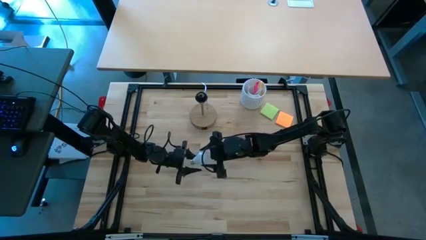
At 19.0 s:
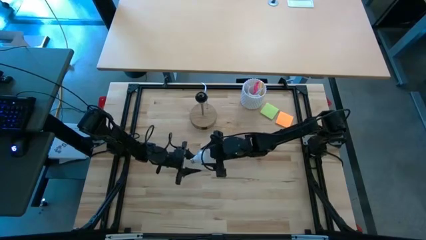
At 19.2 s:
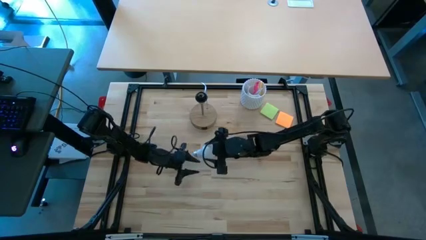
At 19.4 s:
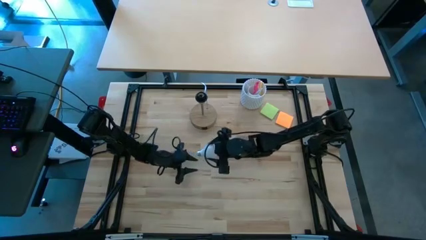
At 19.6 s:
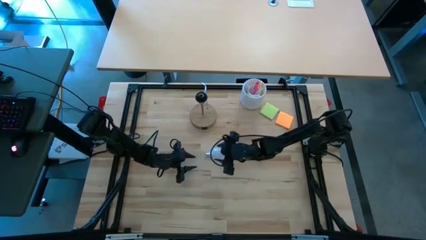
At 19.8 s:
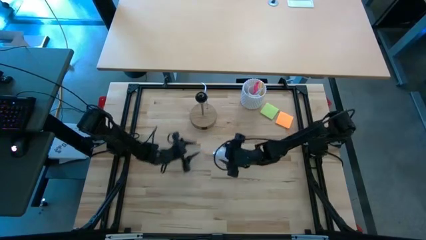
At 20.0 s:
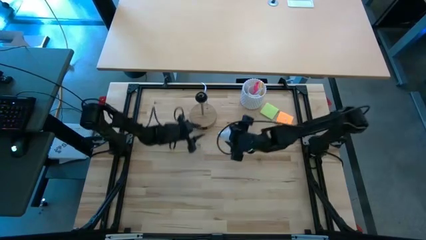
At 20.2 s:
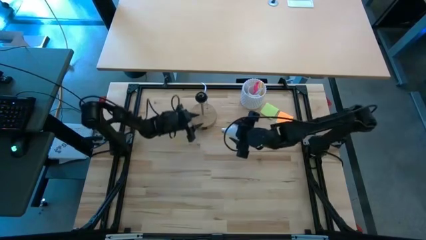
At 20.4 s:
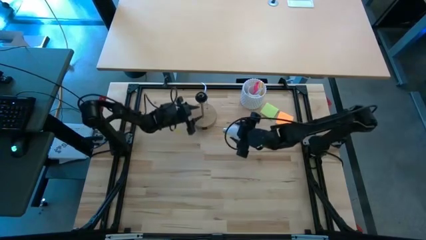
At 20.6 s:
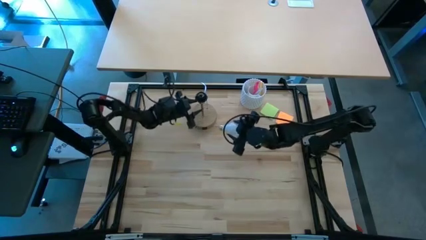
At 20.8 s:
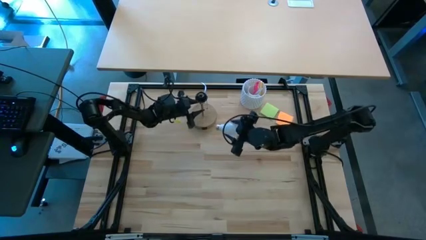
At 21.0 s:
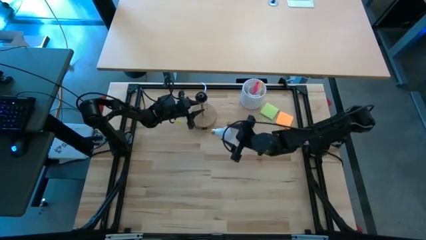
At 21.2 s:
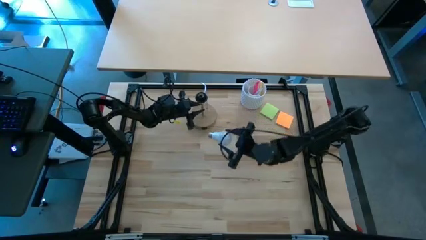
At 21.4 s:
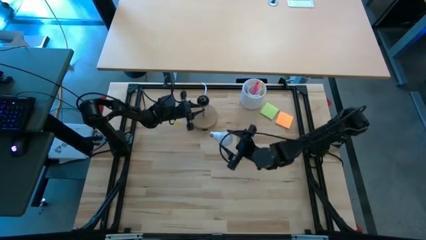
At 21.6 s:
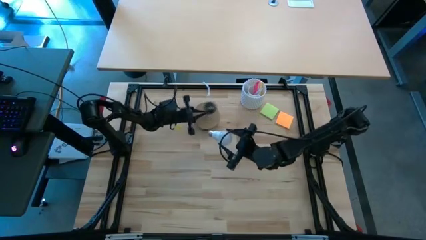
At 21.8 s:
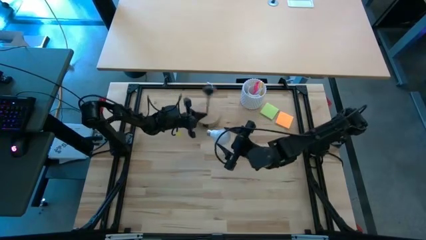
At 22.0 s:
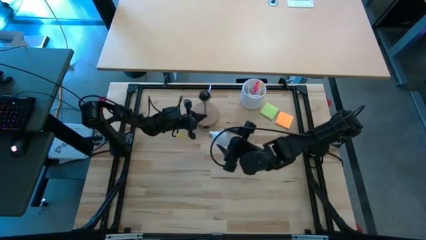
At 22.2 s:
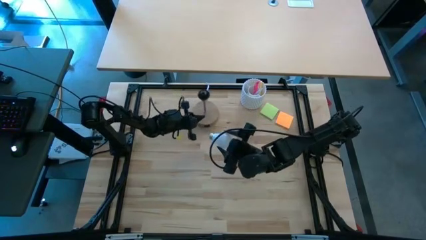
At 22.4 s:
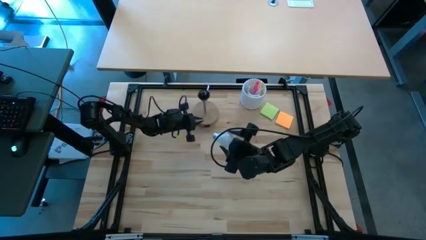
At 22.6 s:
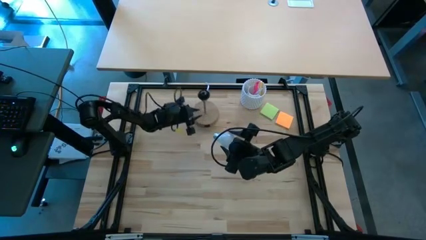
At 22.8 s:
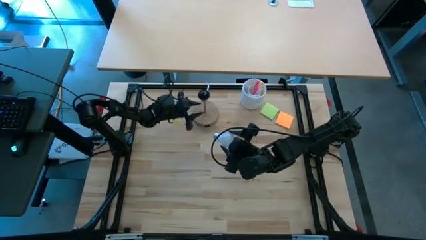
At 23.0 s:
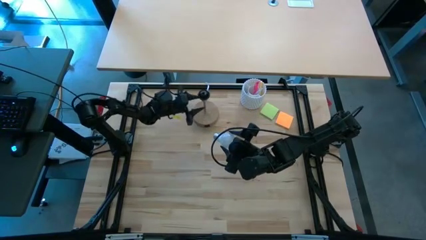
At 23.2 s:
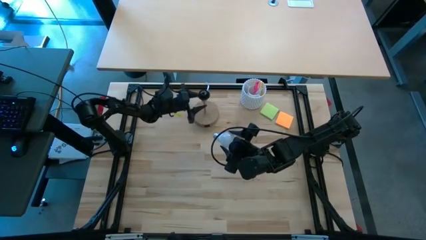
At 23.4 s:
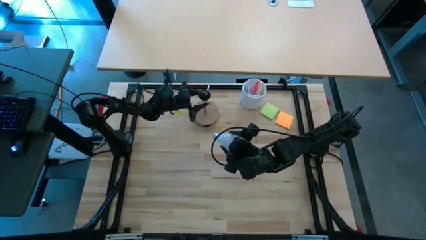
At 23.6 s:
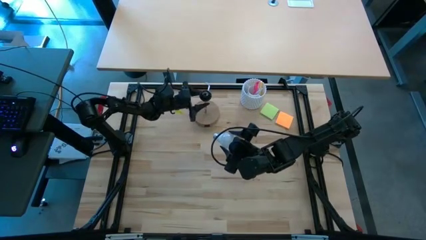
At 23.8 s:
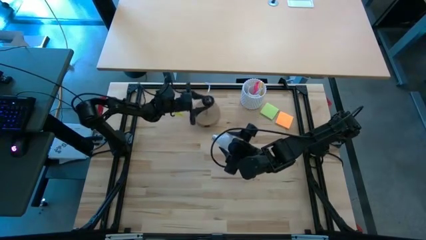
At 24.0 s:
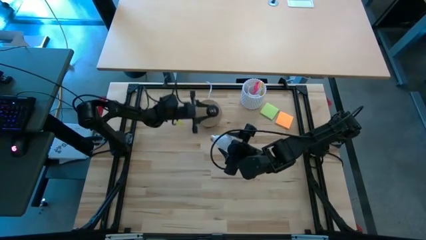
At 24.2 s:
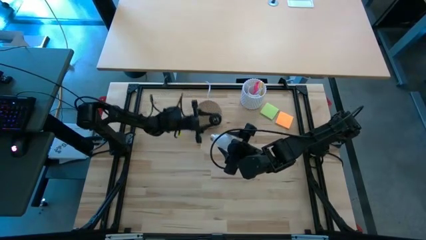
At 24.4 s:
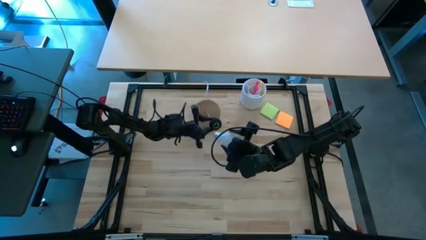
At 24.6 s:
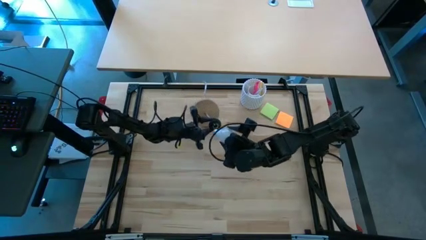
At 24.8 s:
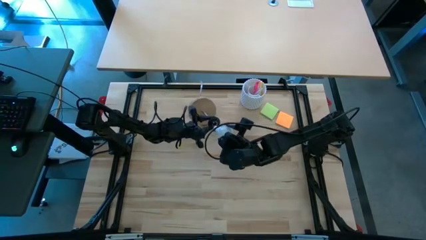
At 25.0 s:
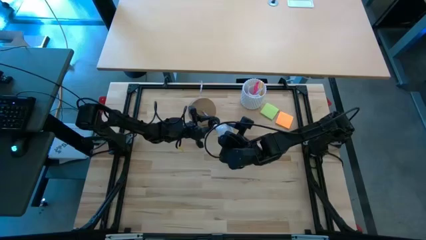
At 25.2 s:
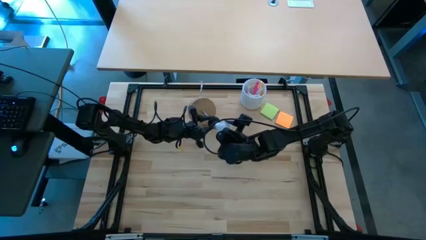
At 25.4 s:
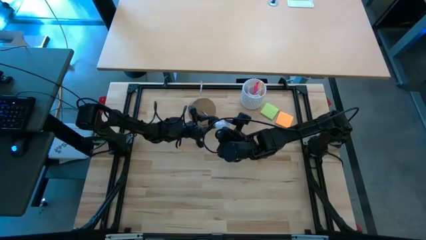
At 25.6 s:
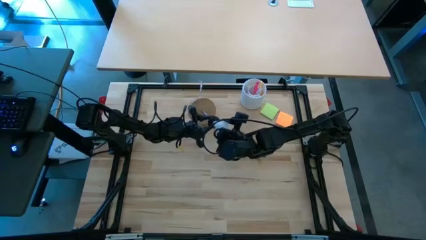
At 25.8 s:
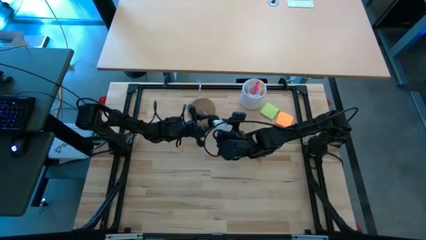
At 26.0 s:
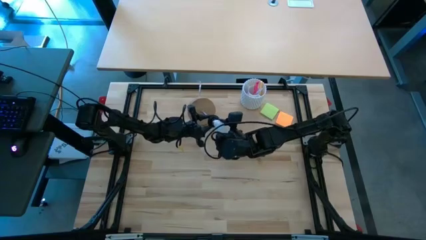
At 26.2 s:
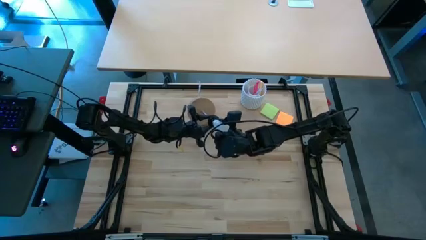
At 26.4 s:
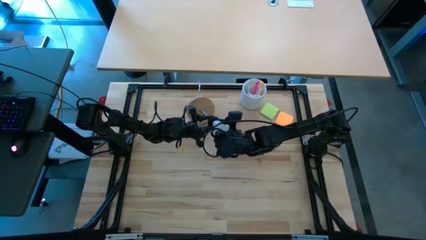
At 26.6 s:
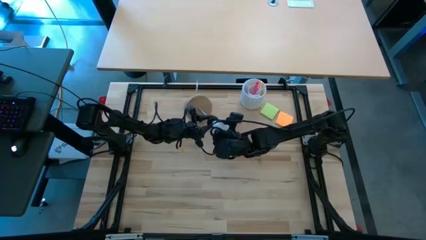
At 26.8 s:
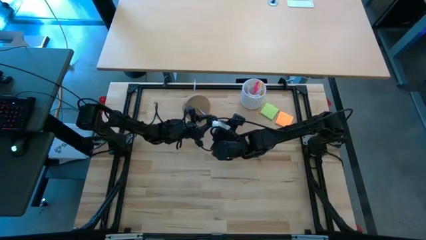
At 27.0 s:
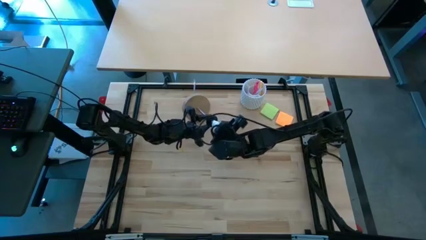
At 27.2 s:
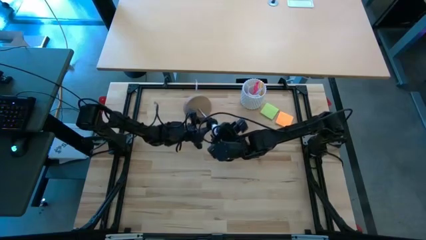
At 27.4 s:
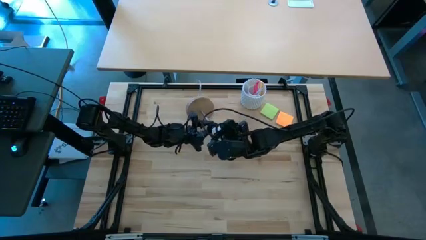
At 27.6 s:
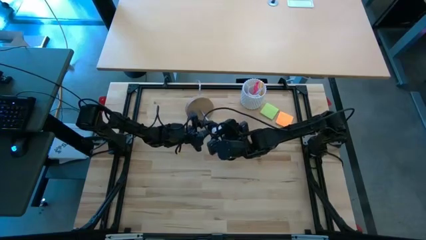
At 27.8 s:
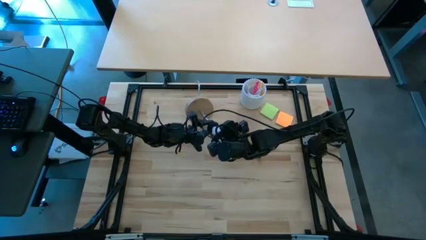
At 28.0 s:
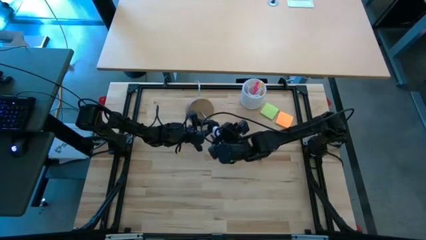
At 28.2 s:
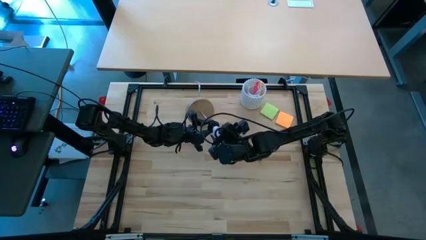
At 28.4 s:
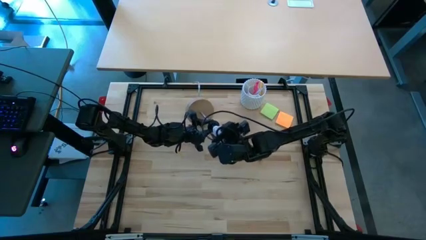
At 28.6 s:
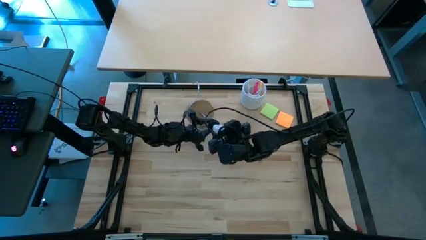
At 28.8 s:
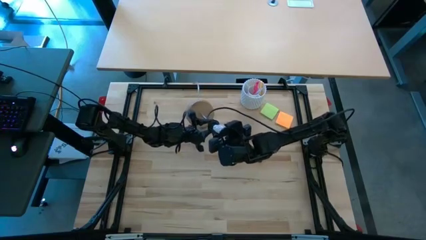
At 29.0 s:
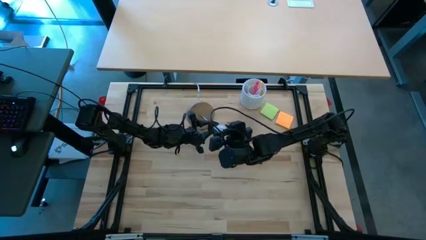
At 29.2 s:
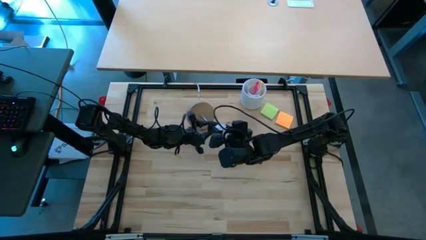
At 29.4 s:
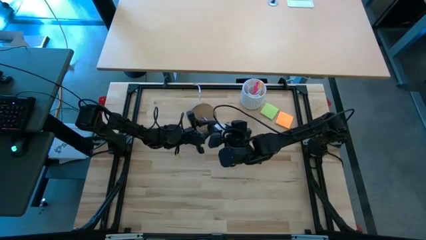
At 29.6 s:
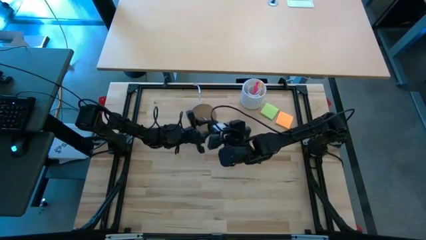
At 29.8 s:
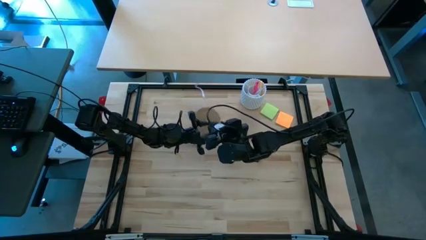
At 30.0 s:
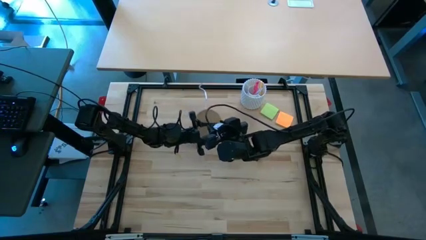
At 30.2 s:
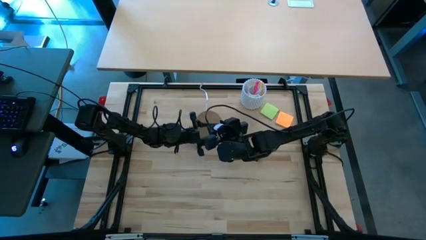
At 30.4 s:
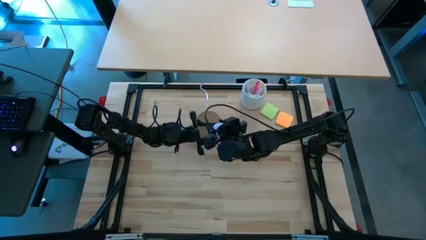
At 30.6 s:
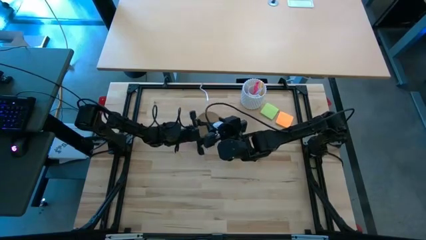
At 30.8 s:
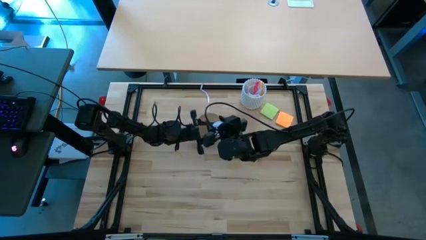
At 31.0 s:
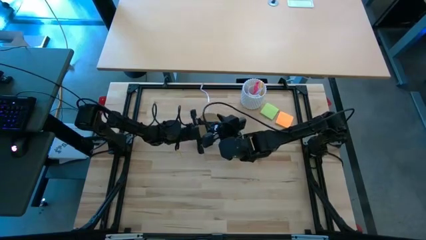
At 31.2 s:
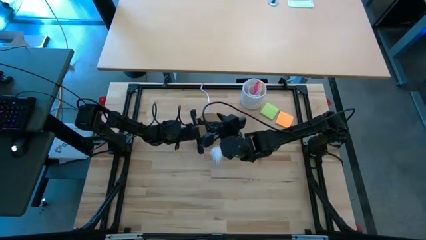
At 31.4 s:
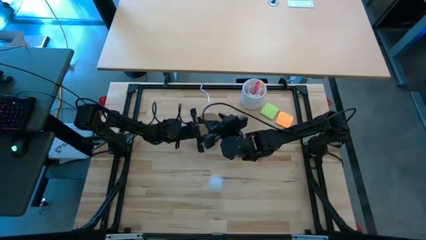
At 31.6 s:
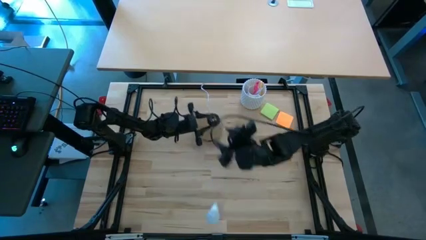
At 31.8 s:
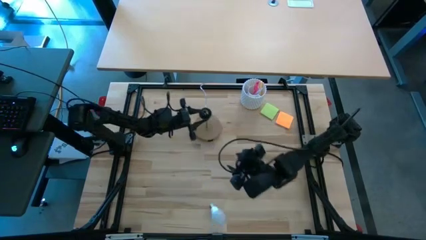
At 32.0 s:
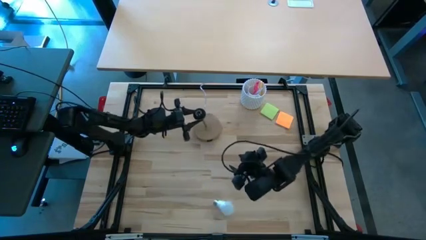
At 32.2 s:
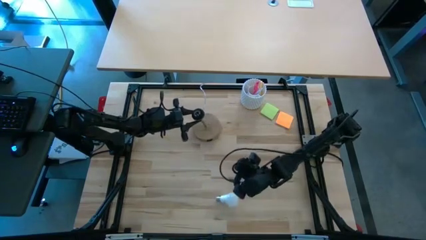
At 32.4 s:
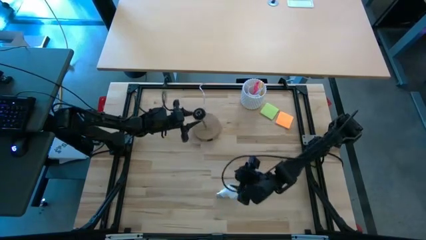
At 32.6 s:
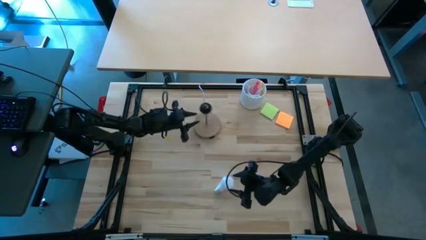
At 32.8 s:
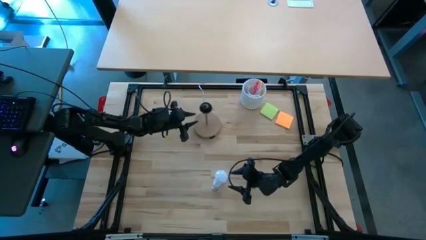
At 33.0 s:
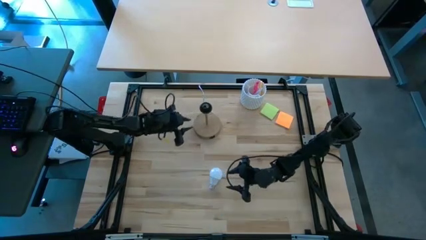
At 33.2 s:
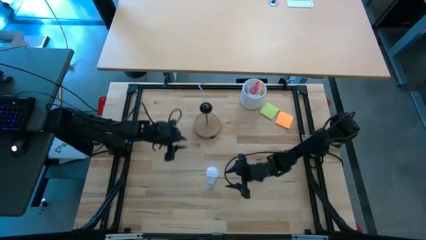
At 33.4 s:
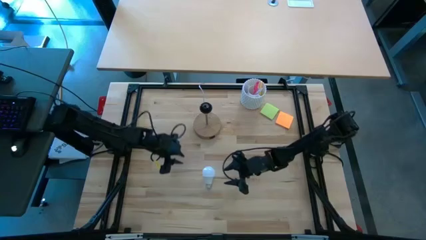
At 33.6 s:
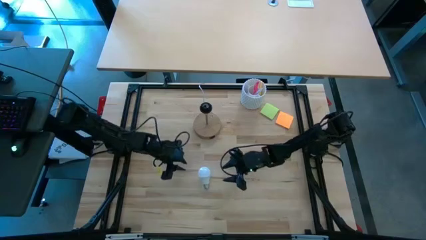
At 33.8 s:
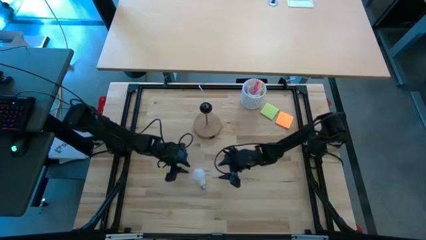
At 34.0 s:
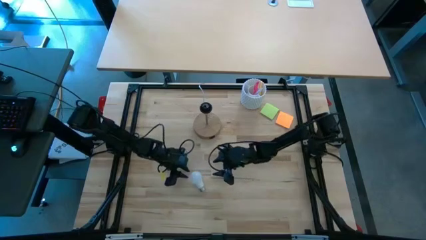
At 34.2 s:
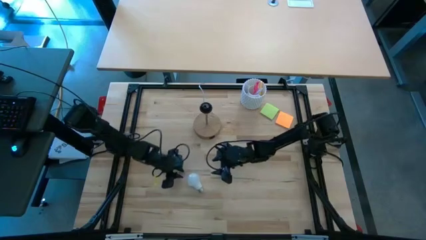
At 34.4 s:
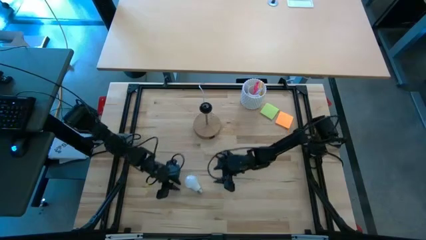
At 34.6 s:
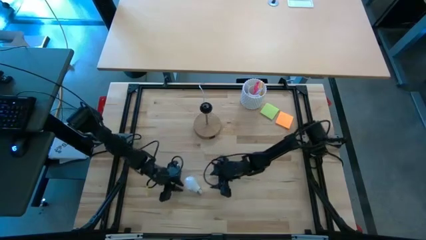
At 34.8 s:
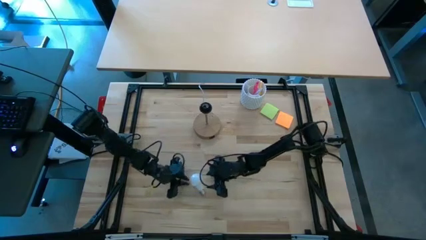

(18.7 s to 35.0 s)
Task: Screw lightbulb
Insert the light bulb into the lamp

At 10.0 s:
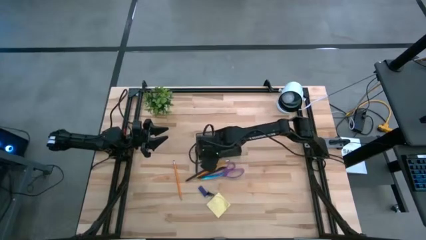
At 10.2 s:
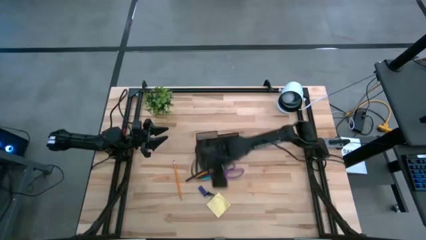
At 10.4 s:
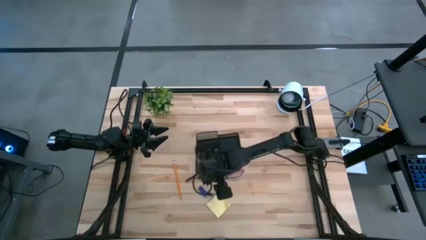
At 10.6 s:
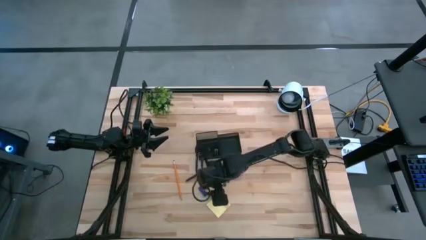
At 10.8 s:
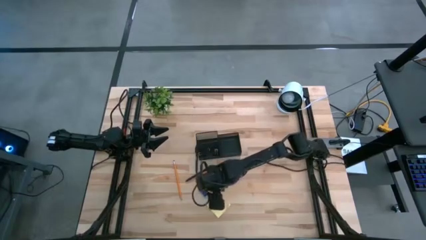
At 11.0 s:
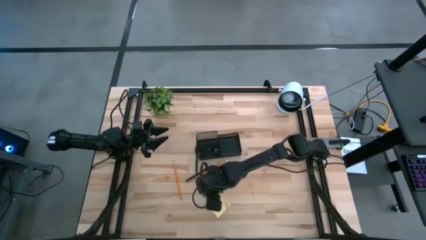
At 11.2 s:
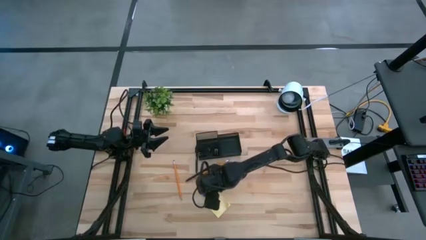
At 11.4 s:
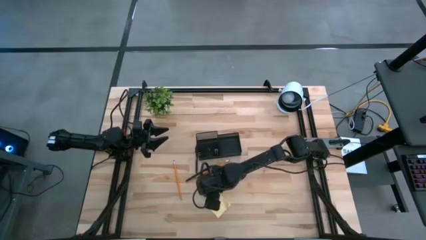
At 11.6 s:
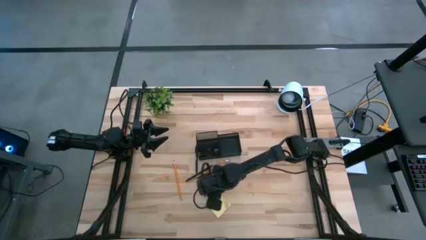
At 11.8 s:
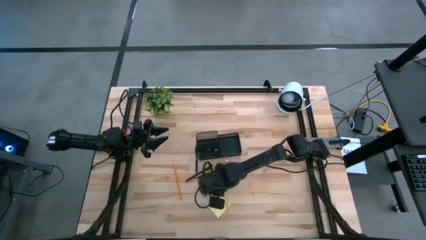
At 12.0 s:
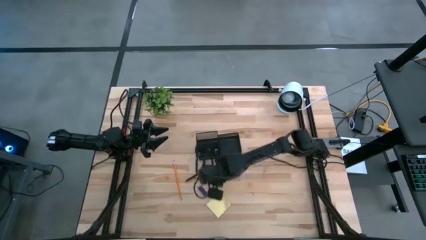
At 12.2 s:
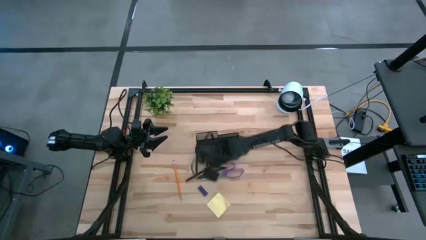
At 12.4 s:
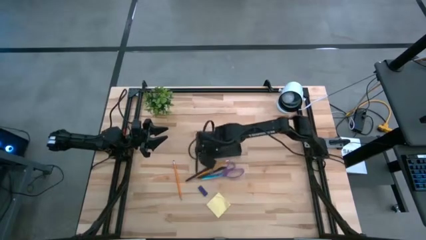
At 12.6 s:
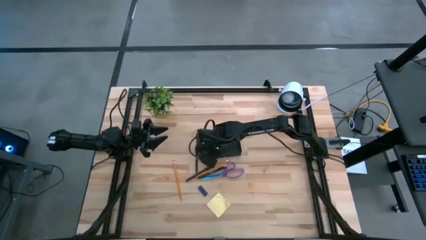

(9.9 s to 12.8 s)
Task: Pick and place office supplies into organizer
Put the black binder clip into the black desk organizer
